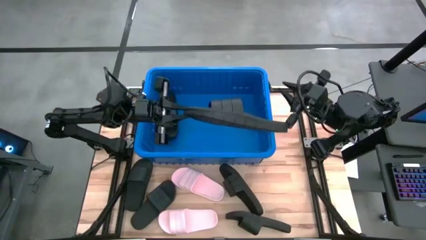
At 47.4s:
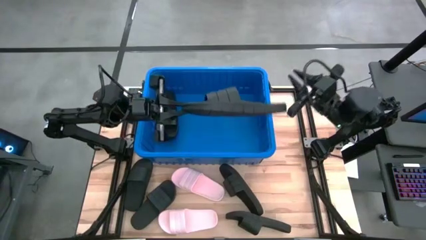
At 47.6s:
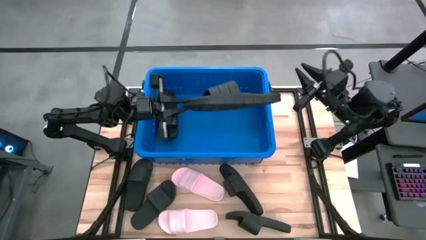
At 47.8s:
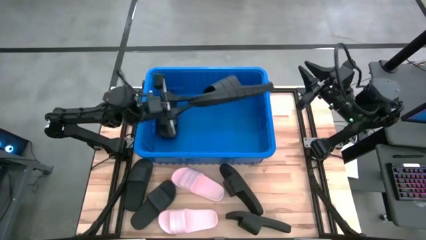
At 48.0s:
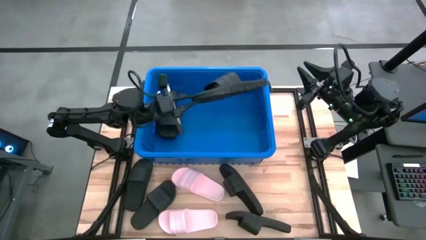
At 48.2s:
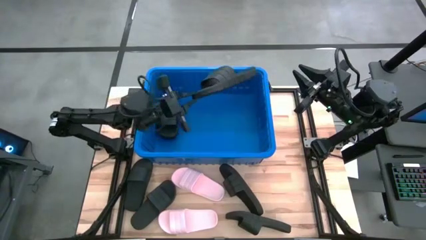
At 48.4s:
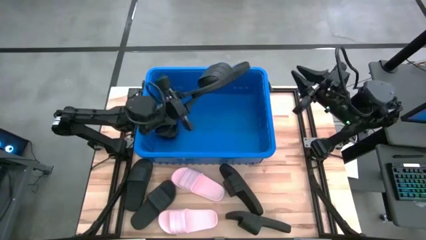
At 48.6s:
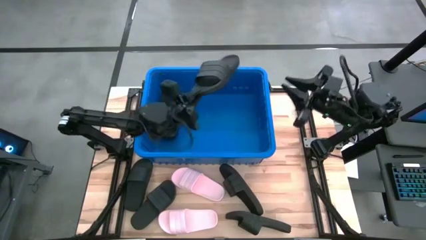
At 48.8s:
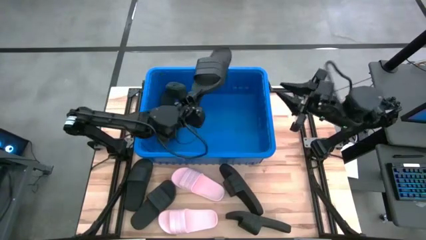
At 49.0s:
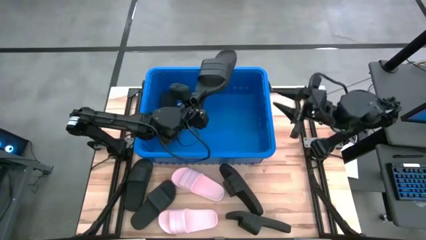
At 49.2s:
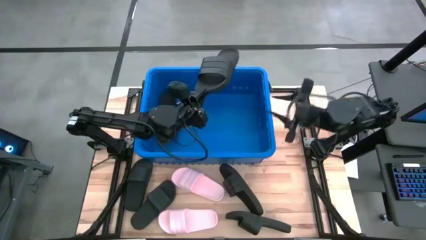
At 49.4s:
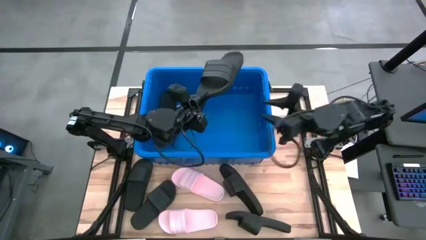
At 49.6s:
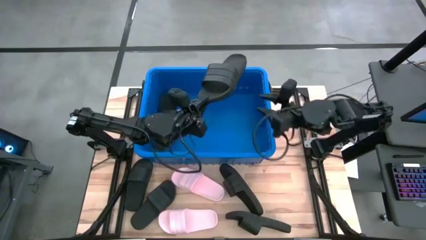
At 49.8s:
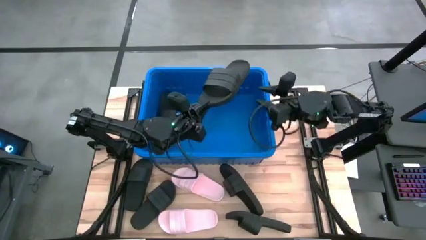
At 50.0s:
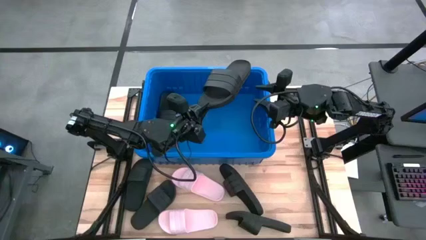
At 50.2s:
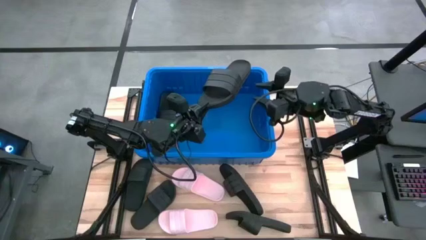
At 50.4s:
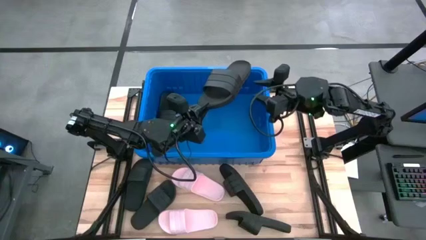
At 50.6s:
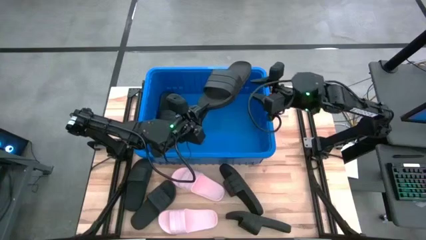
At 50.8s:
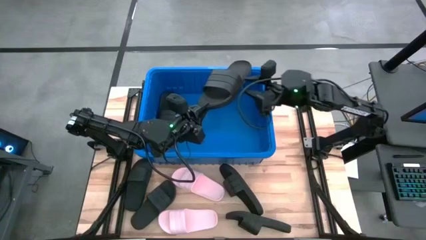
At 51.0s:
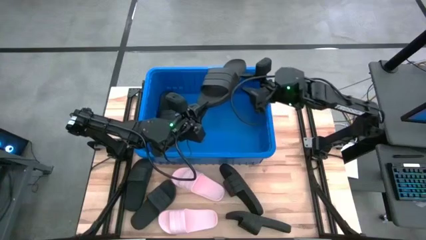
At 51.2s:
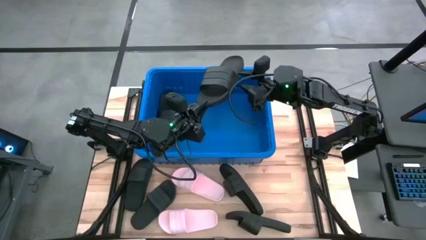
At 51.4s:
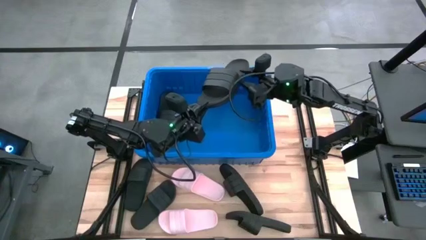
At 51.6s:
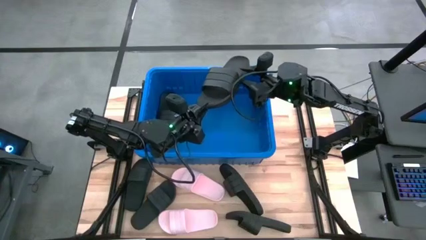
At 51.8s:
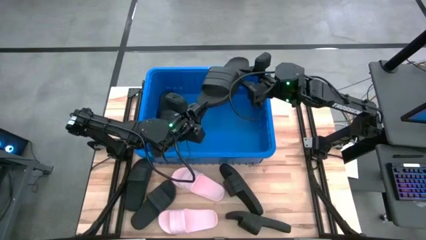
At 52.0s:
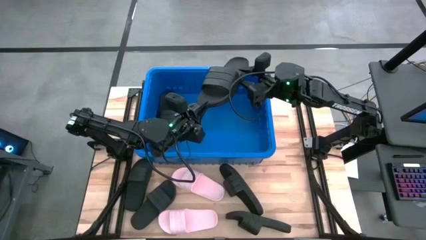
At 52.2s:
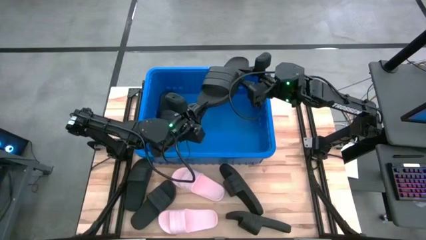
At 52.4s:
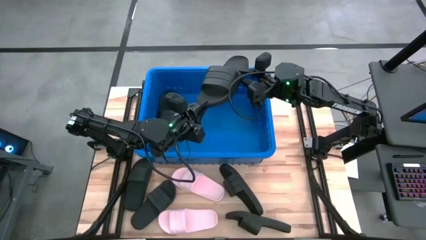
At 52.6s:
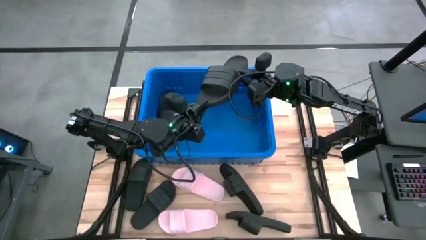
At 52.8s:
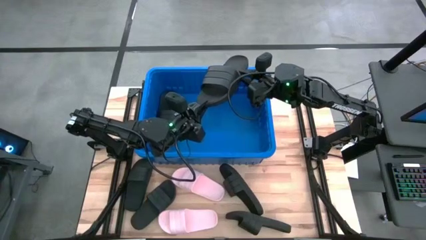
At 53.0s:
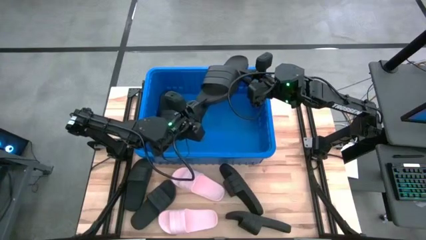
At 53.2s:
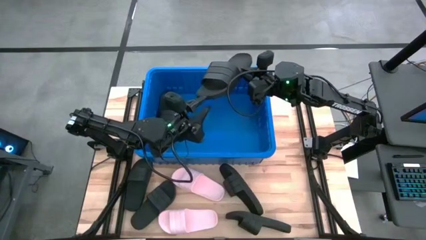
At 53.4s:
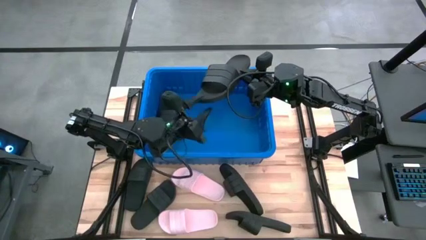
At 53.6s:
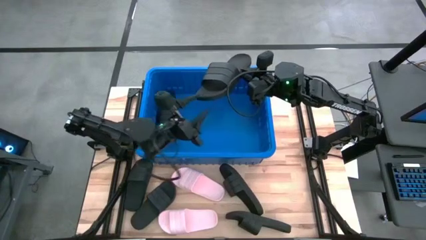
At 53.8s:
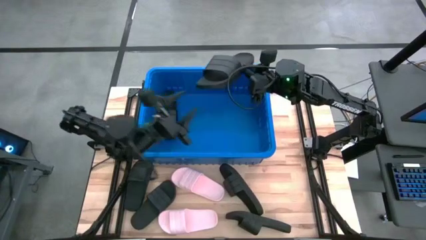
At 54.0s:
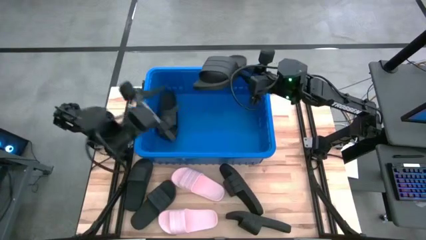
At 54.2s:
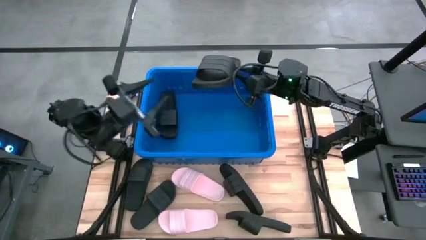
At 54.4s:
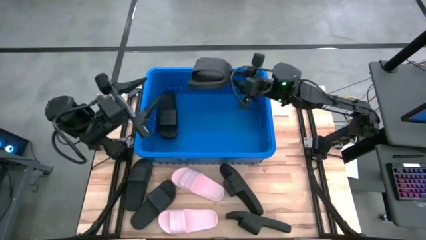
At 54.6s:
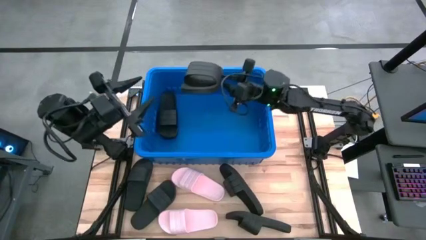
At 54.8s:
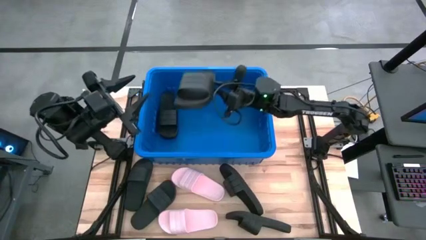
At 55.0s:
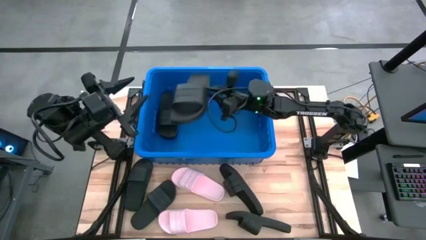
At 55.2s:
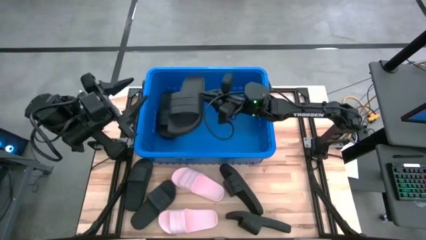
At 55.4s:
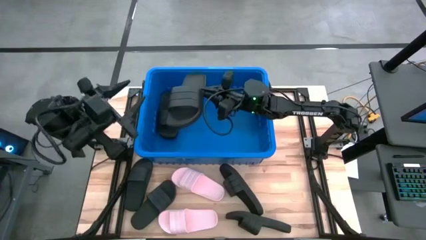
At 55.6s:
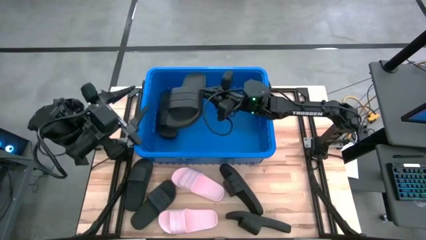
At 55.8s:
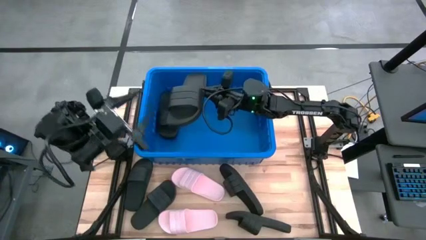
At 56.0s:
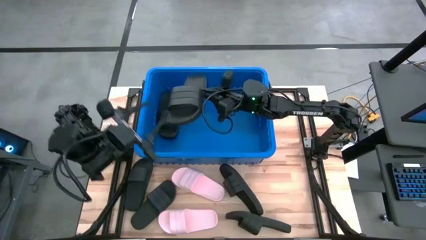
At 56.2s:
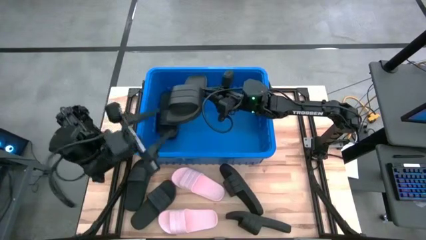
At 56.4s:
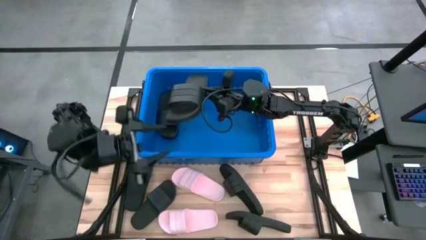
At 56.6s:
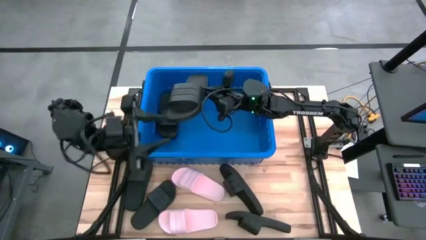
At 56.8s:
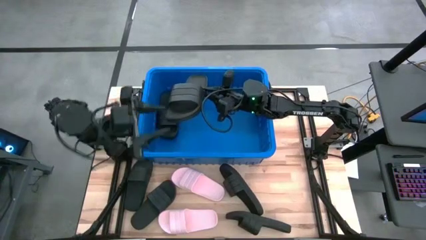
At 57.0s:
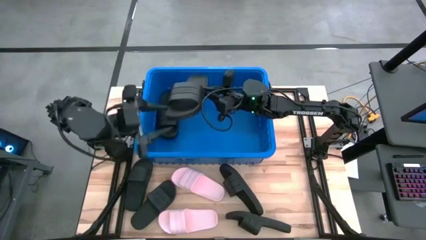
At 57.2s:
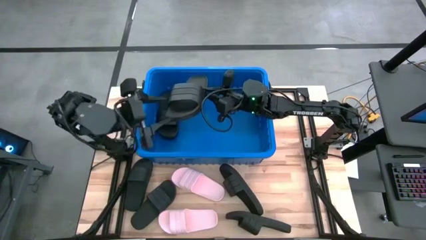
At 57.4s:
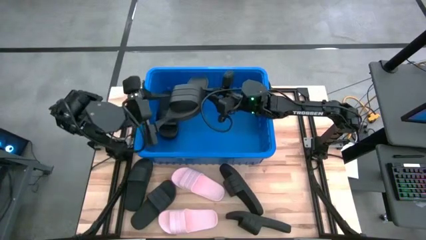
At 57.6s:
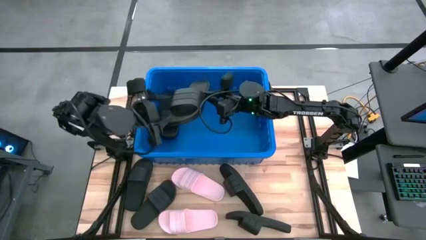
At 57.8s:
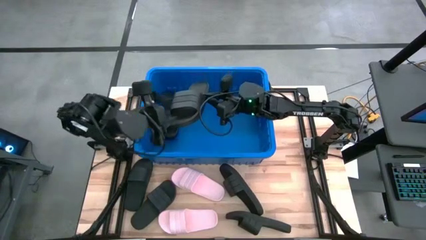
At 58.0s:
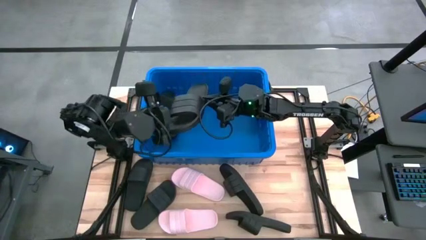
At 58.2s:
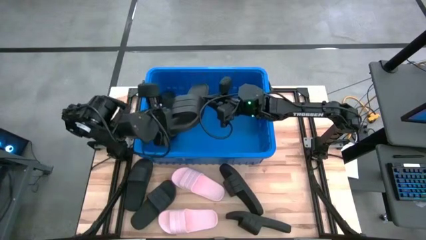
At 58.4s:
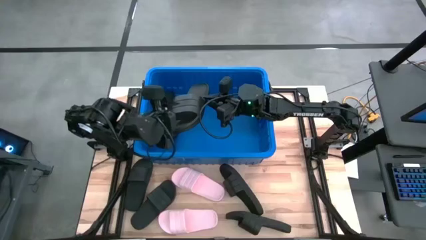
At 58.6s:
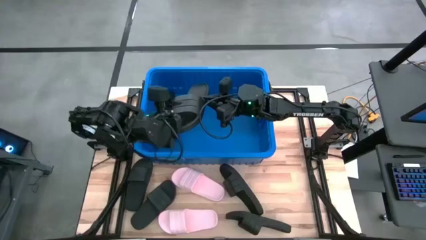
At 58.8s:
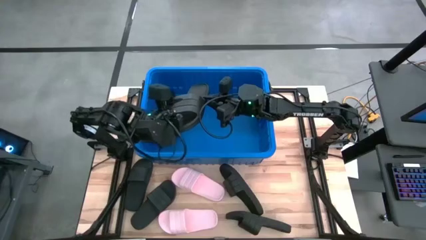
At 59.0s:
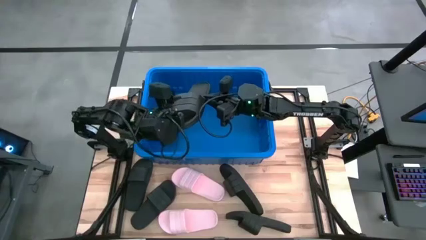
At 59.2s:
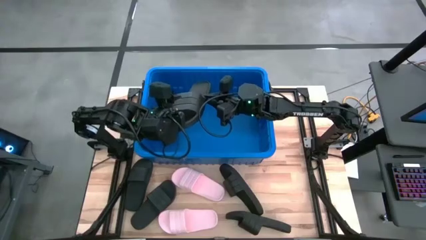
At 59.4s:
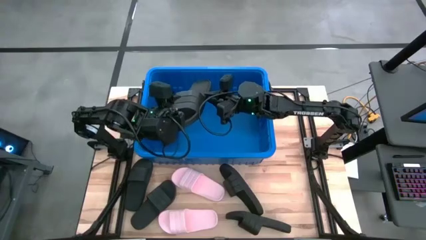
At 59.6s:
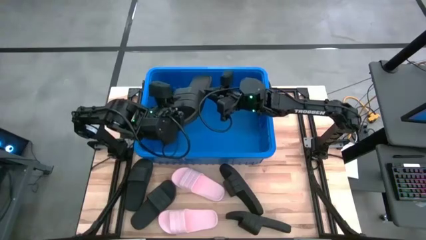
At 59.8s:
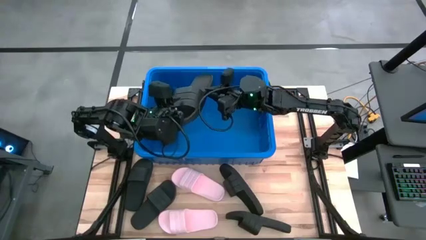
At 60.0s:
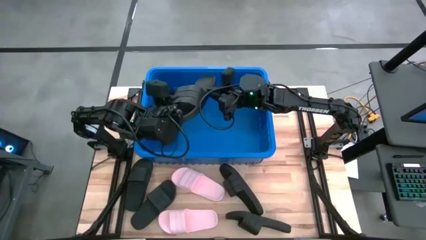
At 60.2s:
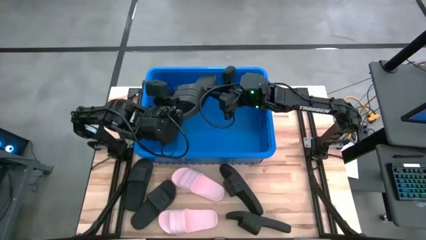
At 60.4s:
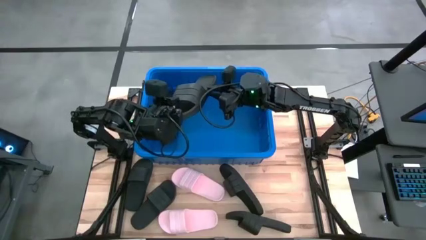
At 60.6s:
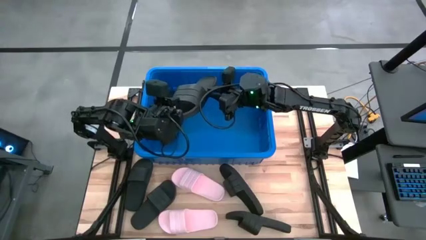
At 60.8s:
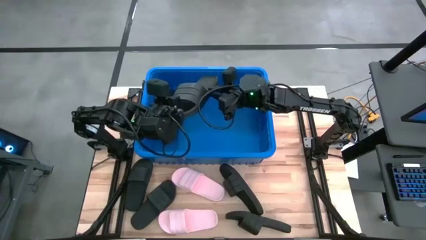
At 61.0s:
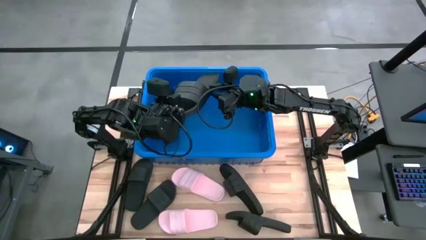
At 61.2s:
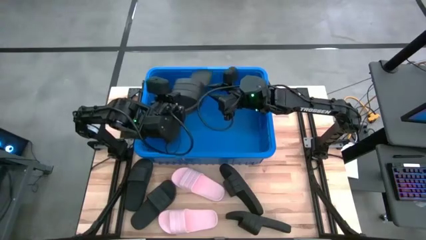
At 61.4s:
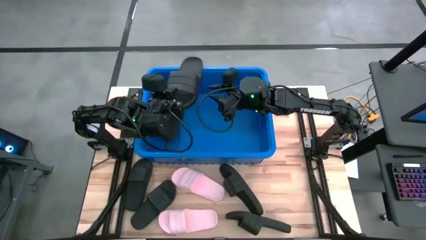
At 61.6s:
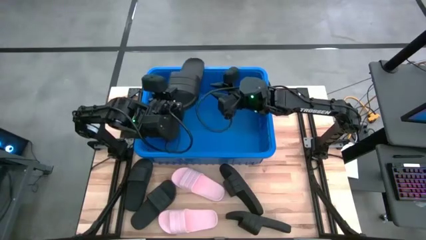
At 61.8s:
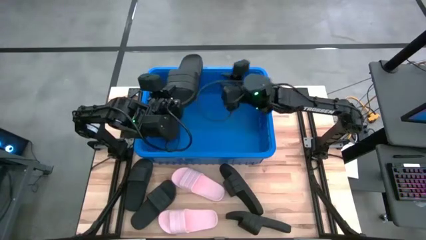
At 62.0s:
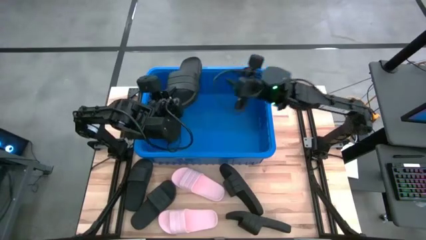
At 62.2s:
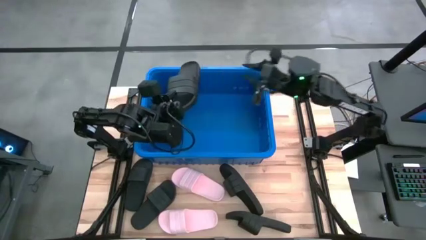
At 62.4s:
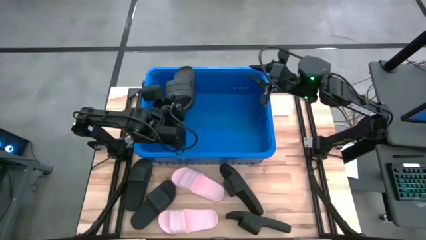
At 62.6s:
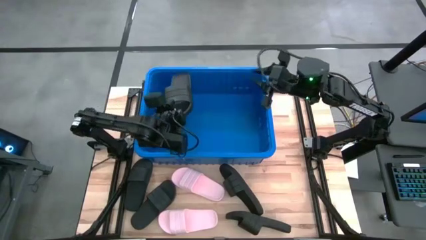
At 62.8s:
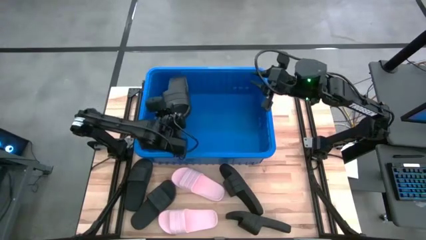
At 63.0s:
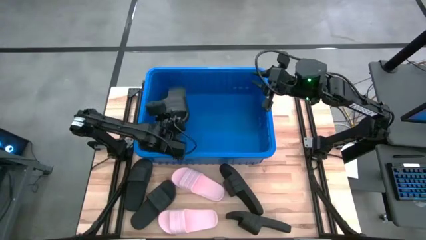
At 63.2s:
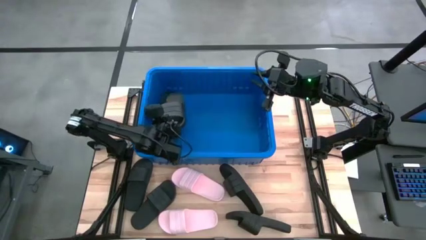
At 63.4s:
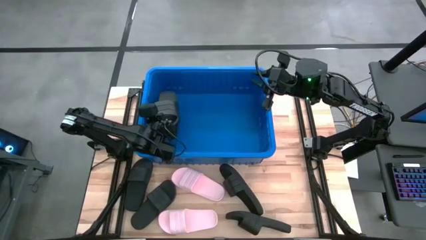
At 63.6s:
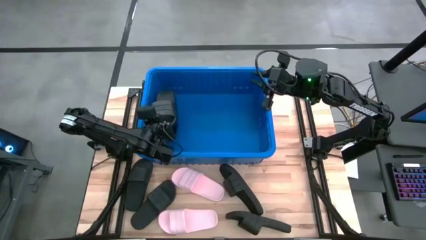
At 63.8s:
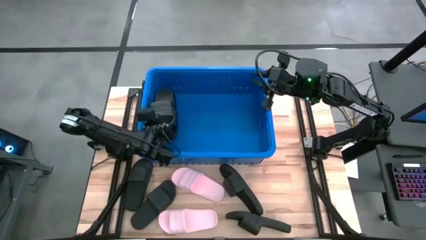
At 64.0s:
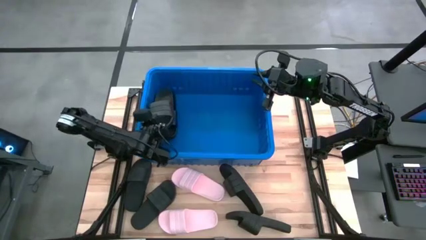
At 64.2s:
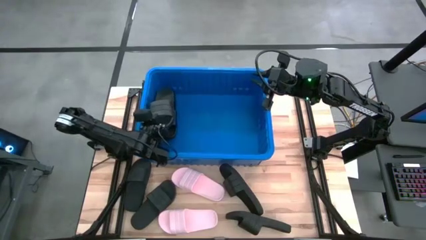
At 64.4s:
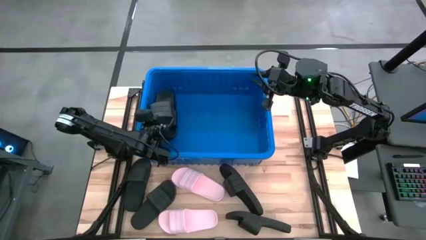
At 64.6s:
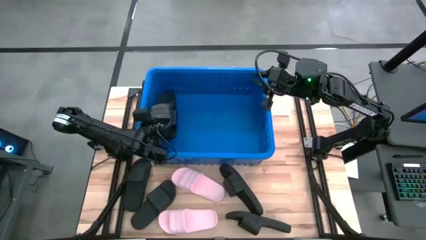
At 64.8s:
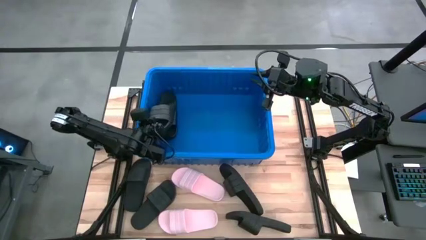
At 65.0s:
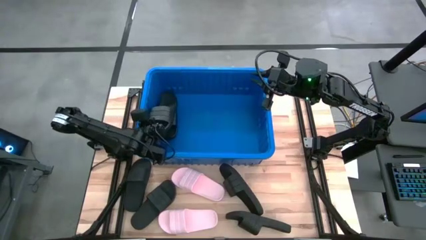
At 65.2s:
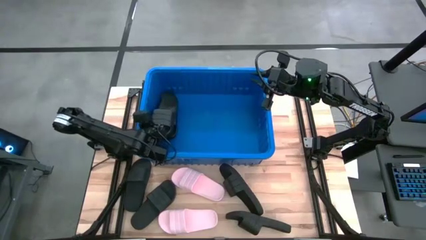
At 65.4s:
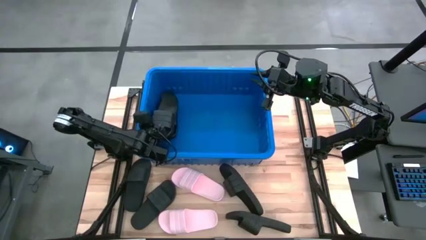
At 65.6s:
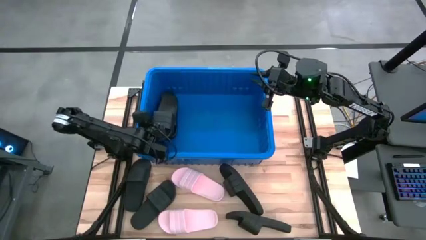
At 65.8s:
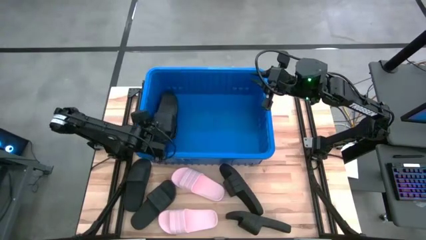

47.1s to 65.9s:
Task: Pick and place slides into bin
Stack the black slide on top of the black slide into the blue container
